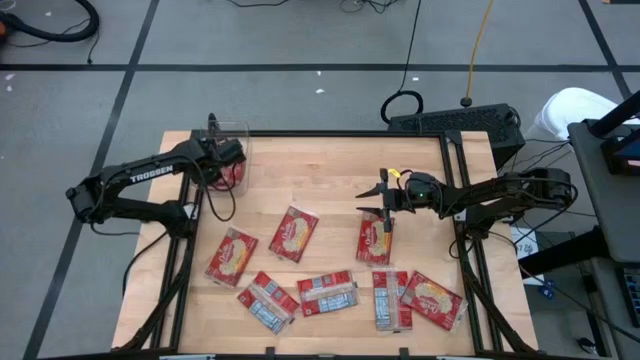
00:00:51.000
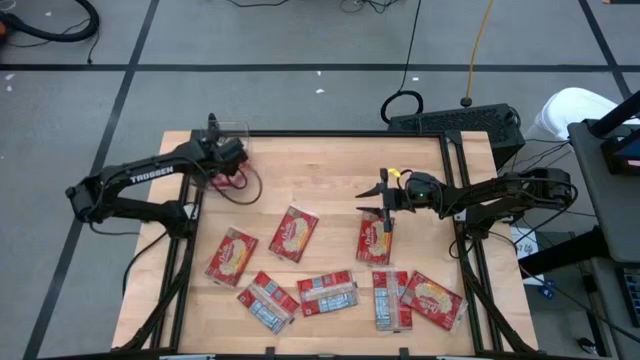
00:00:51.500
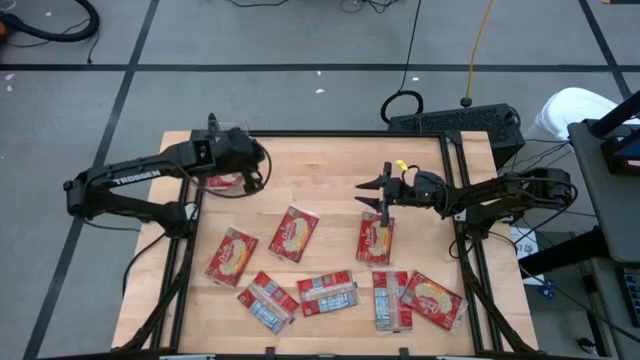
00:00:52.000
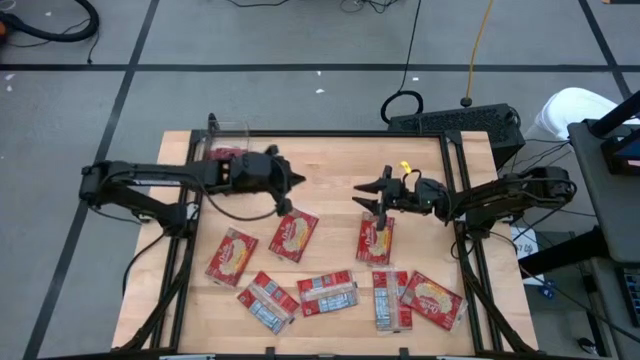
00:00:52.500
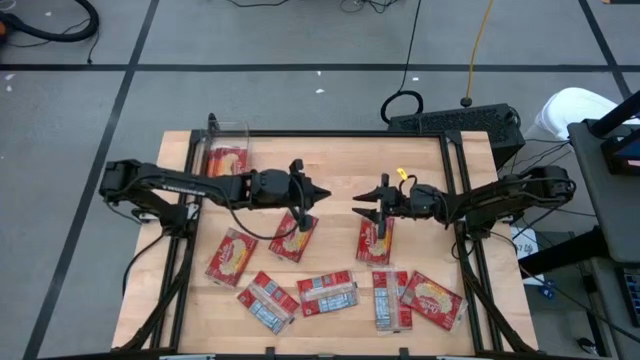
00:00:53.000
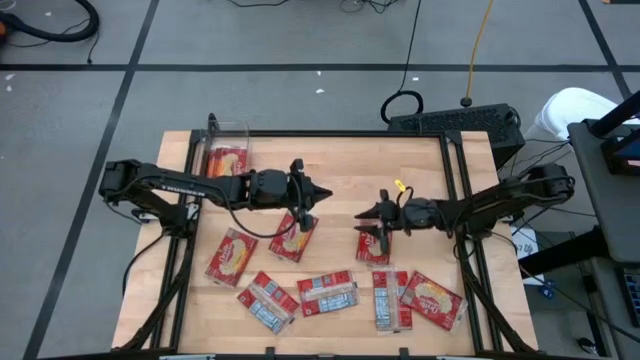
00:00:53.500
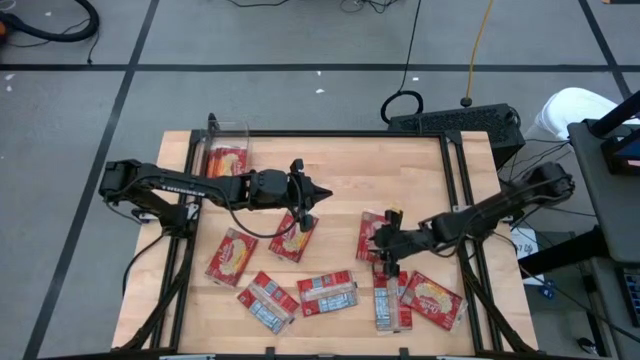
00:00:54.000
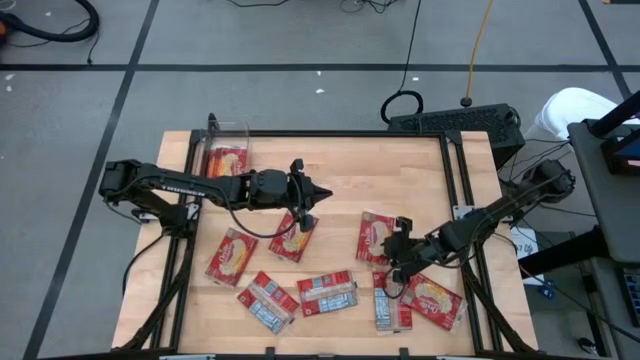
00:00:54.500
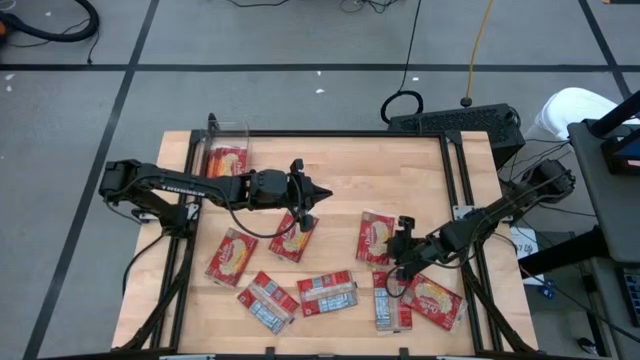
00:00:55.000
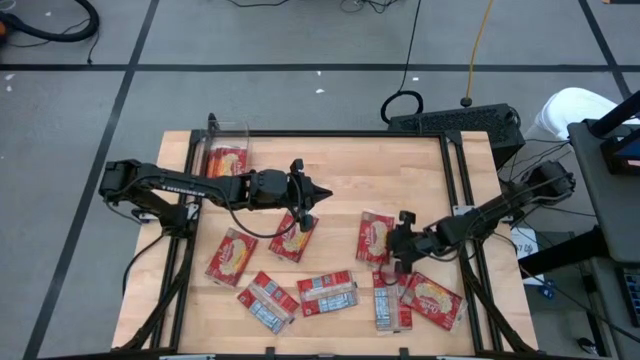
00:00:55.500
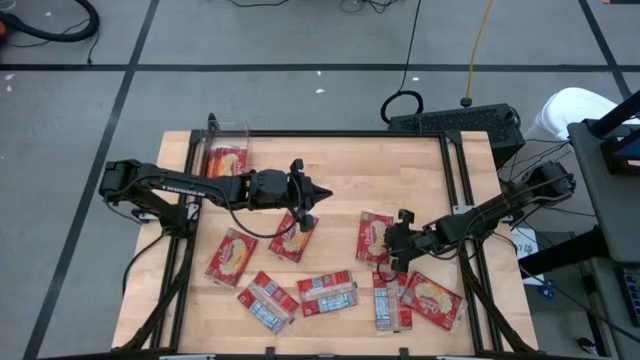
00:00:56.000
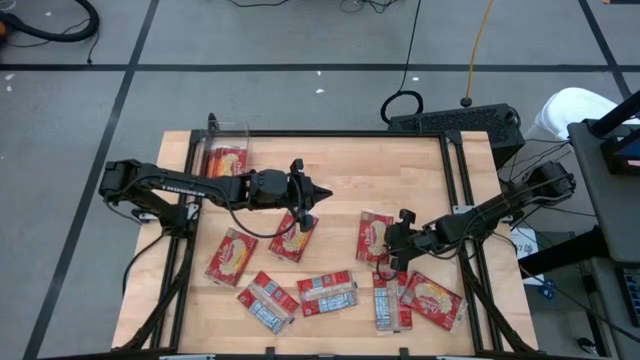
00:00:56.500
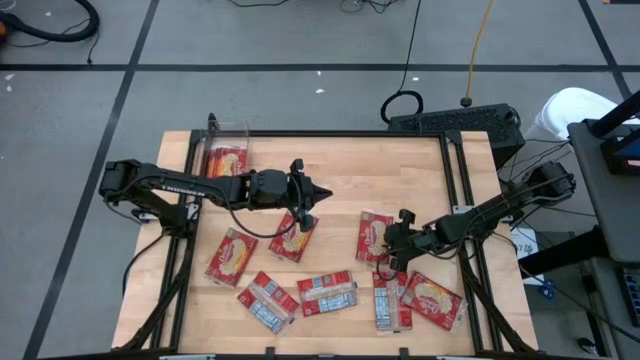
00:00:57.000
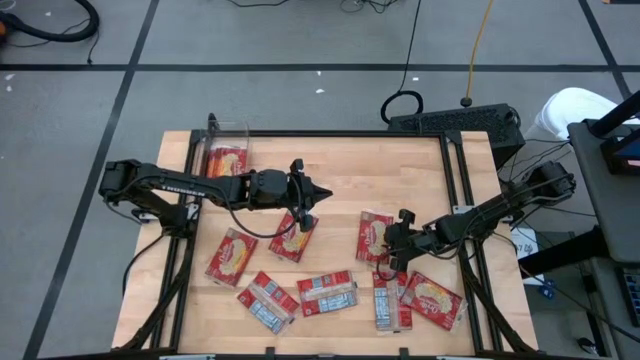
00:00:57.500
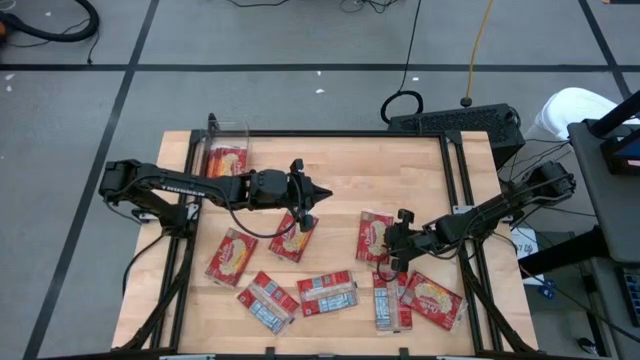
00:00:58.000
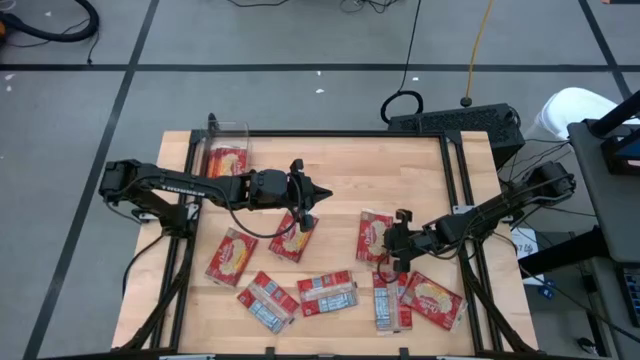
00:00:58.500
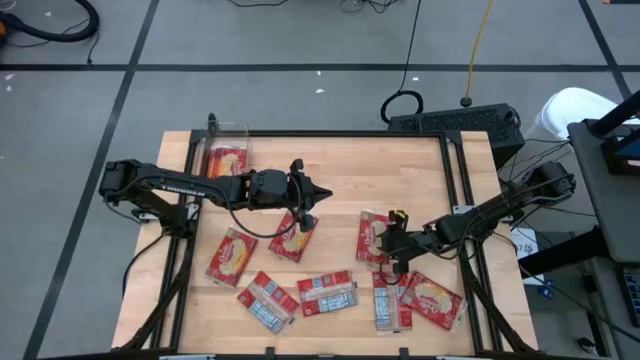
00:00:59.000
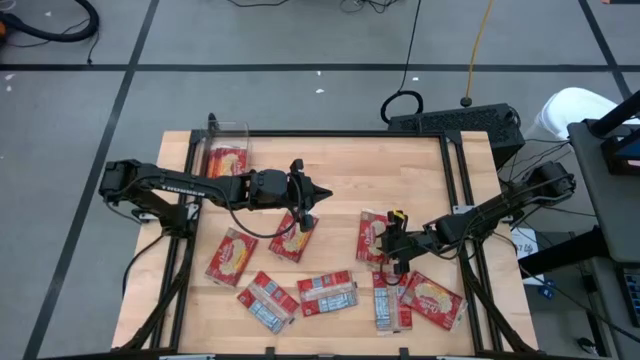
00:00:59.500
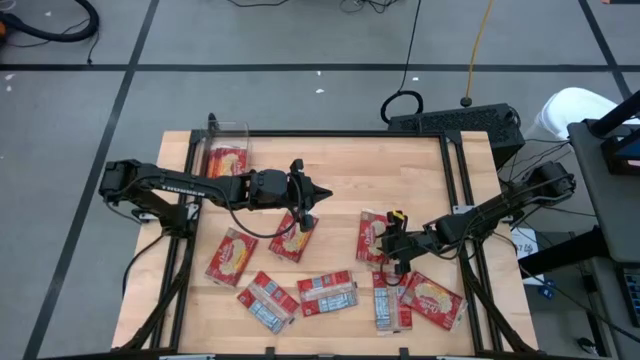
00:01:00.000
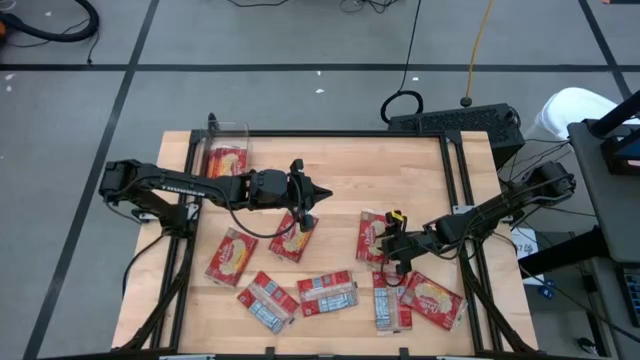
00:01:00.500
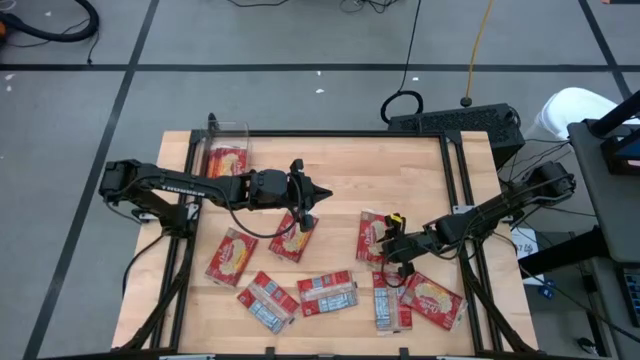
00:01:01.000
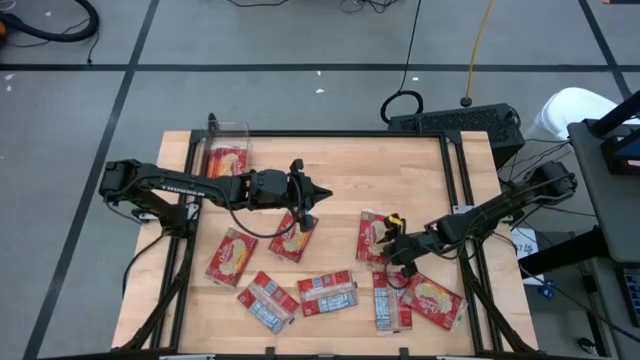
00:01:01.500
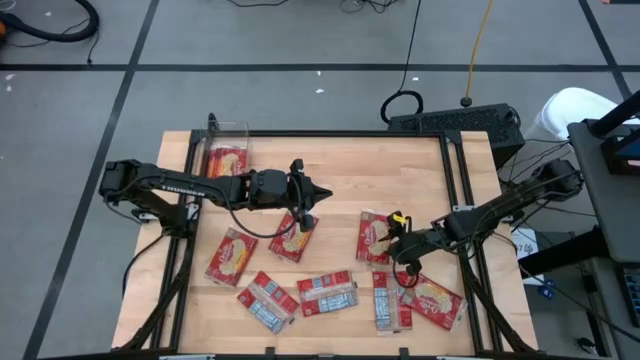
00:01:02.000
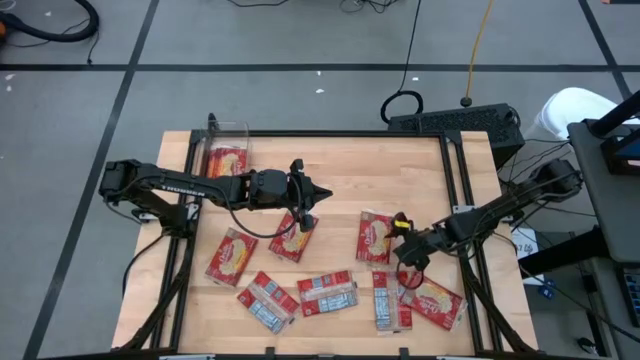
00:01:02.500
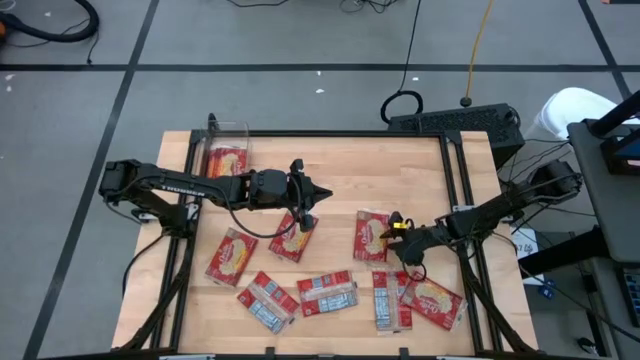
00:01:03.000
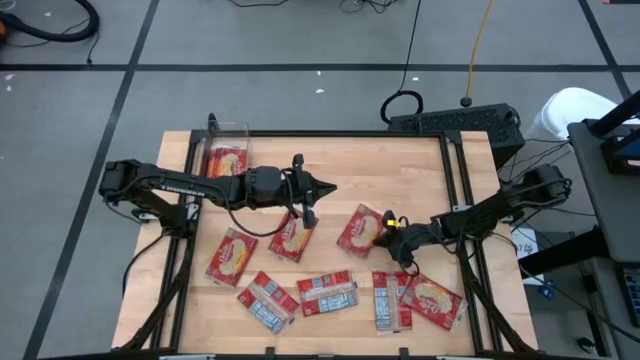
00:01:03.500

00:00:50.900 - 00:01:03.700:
Task: Sort popcorn bags into baskets
Put the red popcorn bag into the transparent bin

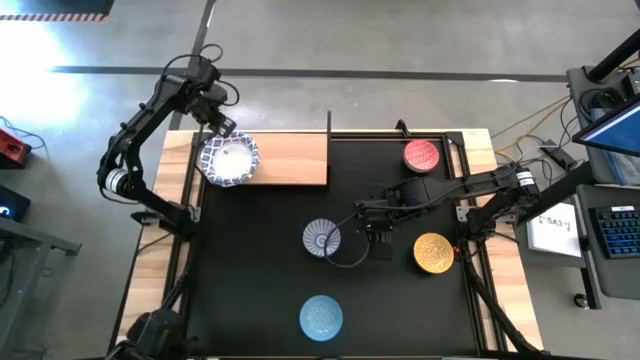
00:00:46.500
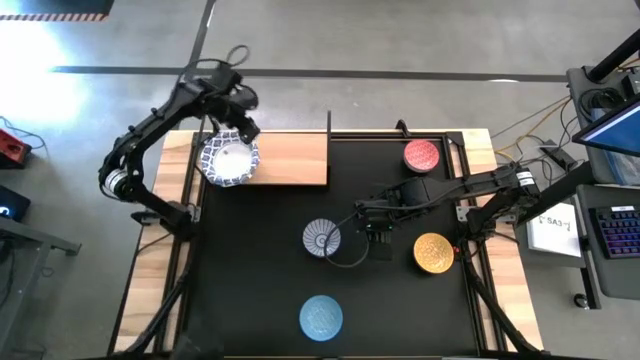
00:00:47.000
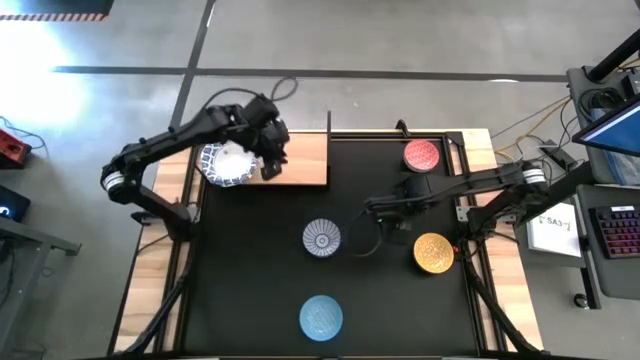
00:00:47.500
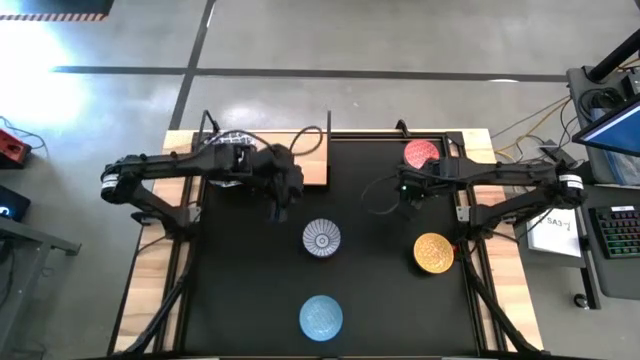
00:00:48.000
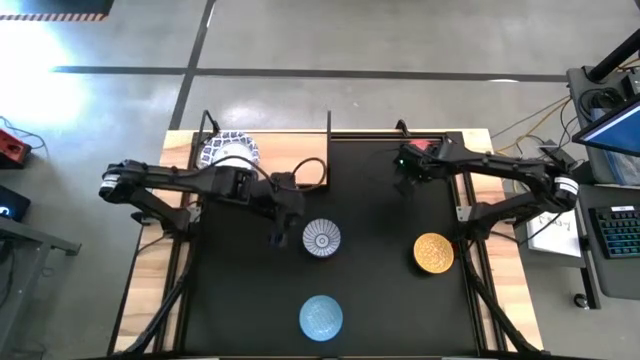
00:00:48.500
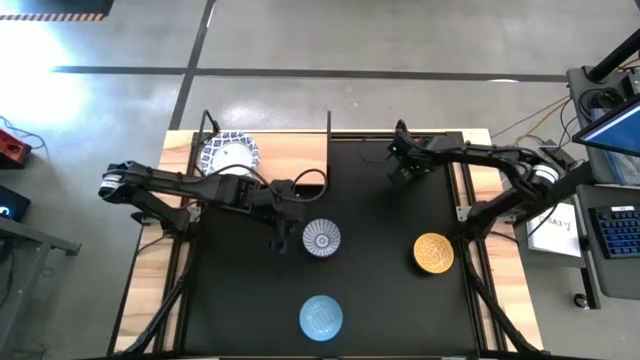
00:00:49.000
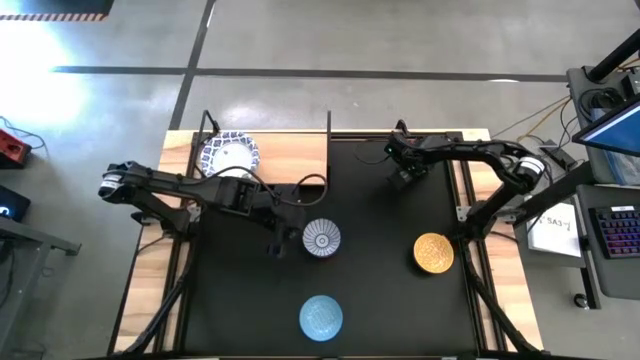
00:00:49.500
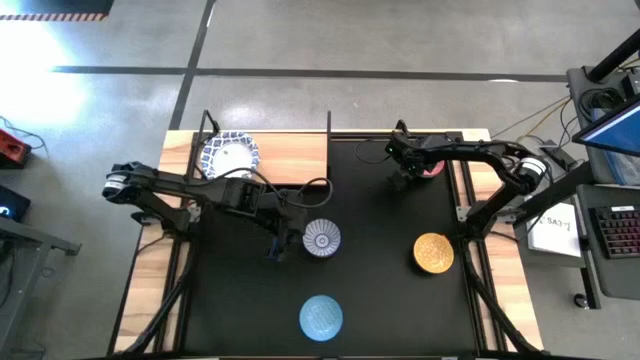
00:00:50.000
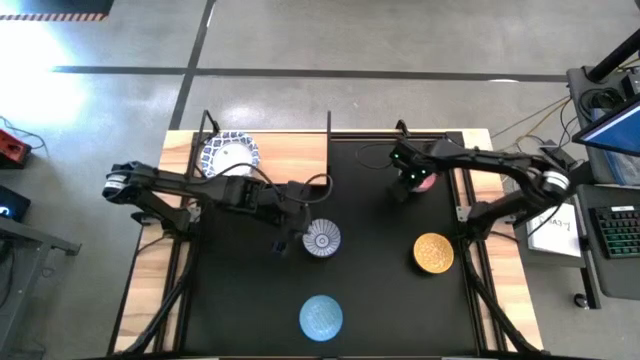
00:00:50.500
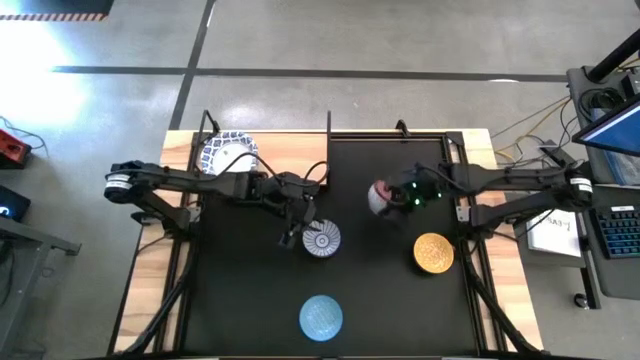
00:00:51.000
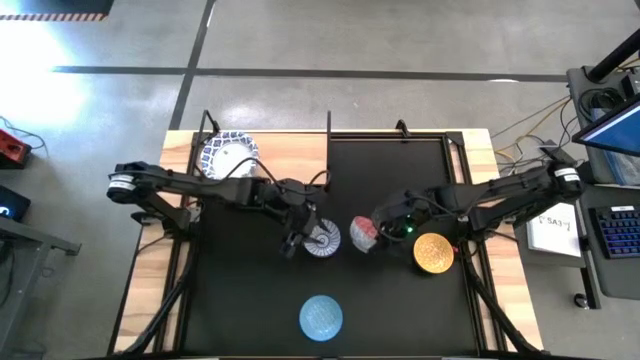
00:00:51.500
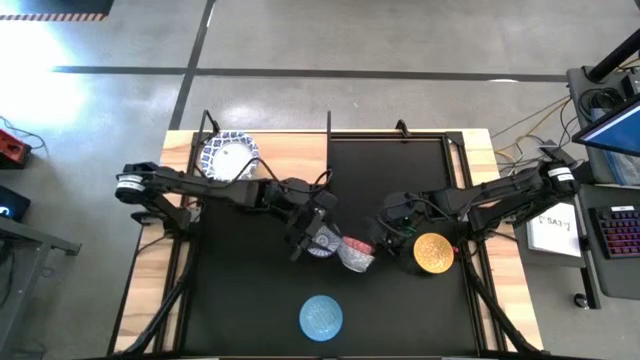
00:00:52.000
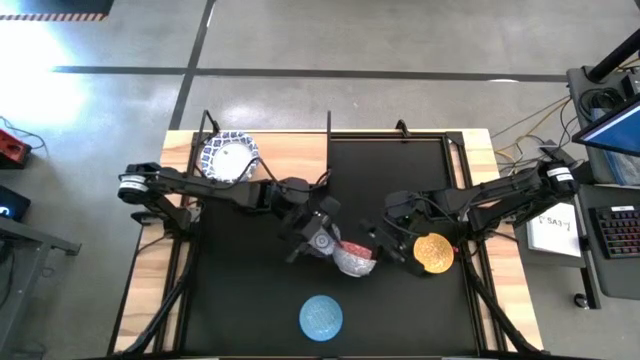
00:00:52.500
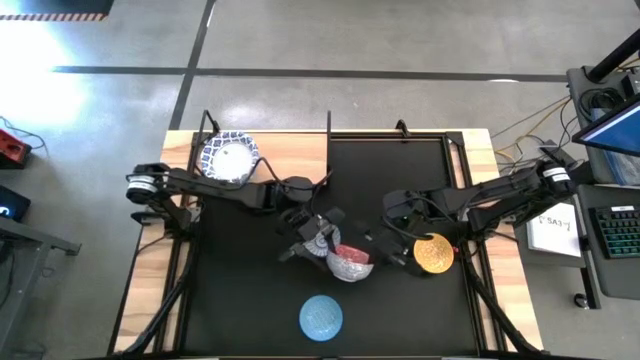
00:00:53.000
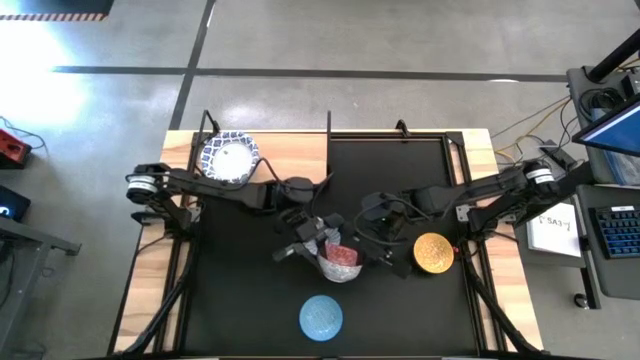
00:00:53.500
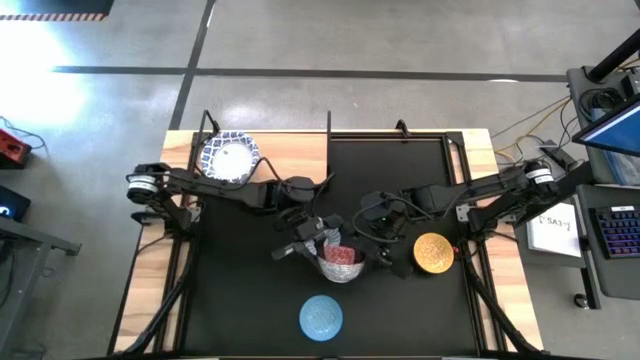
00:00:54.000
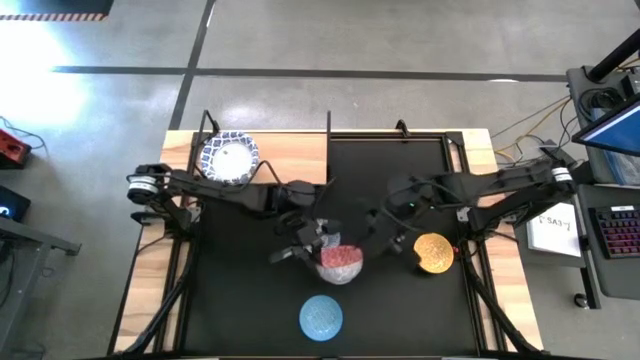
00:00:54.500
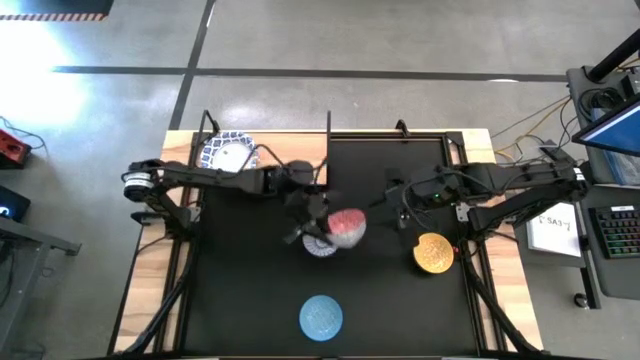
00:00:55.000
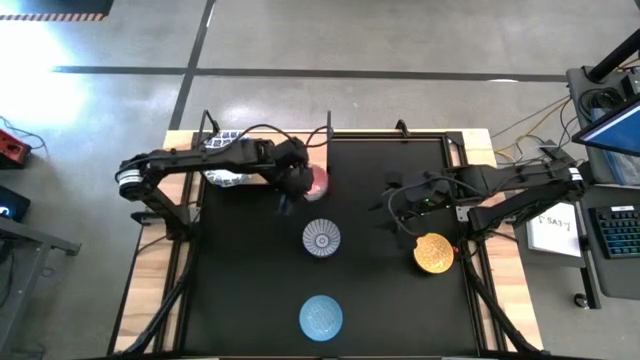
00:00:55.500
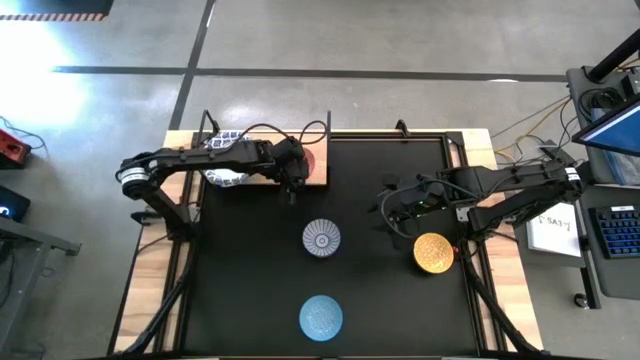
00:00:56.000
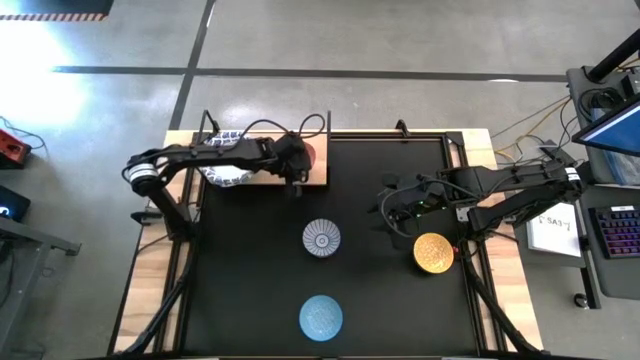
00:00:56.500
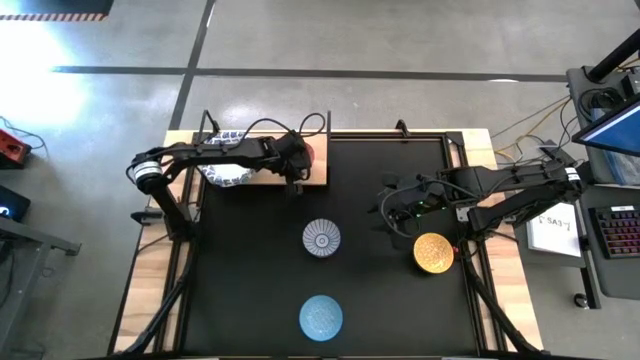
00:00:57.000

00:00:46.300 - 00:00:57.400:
Task: Place and stack bowls onto a shelf
Put the red patterned bowl on the shelf
